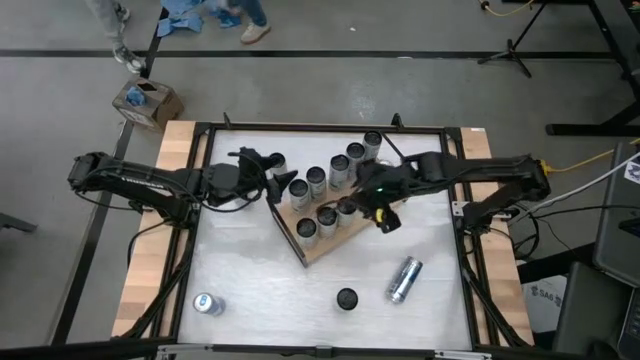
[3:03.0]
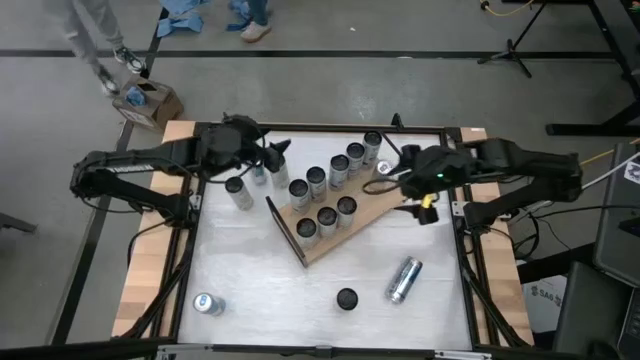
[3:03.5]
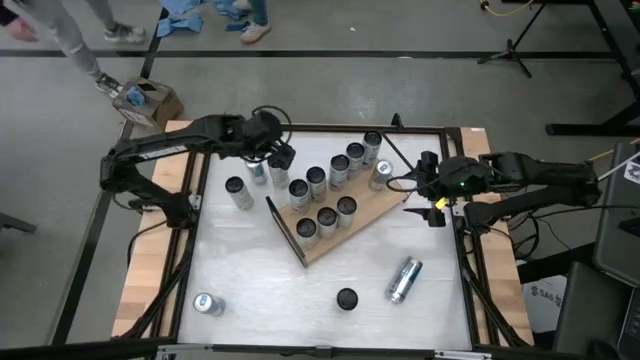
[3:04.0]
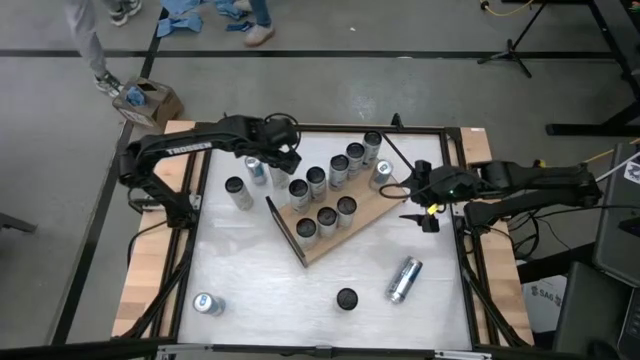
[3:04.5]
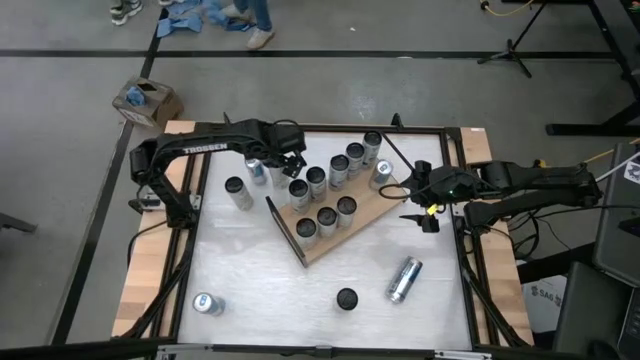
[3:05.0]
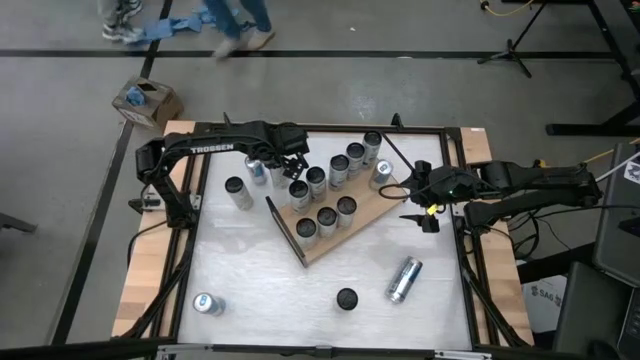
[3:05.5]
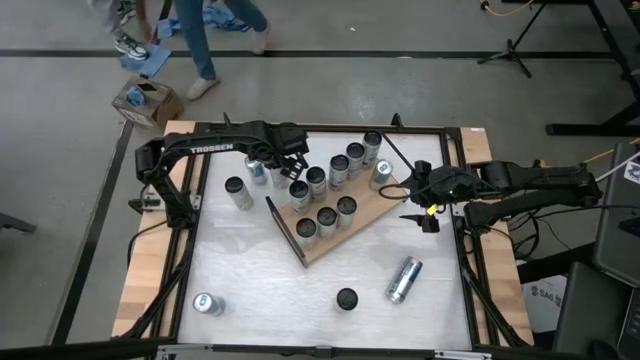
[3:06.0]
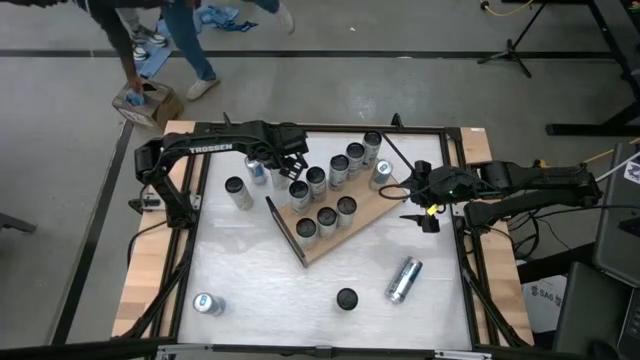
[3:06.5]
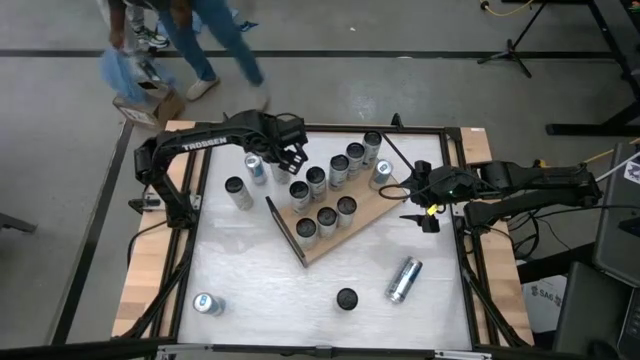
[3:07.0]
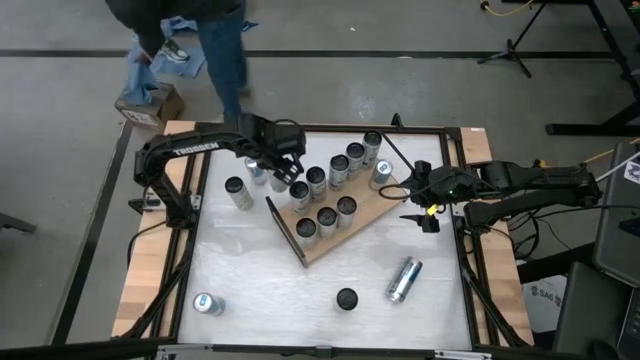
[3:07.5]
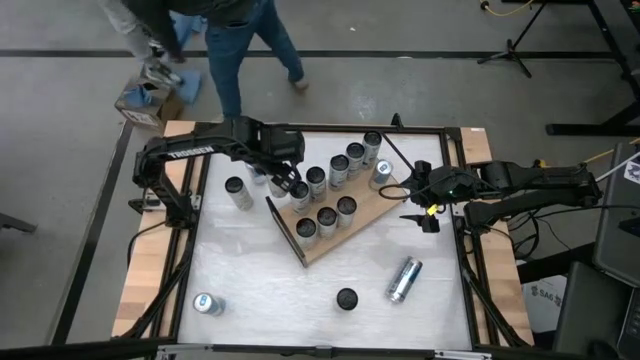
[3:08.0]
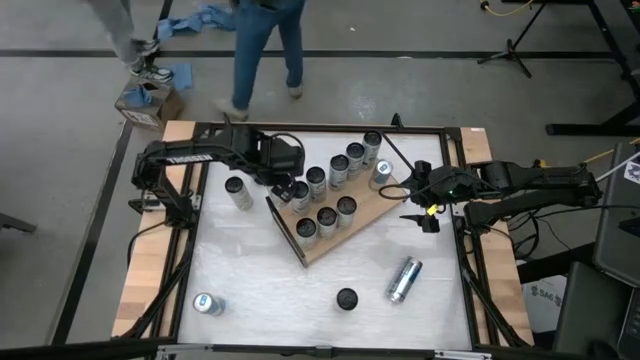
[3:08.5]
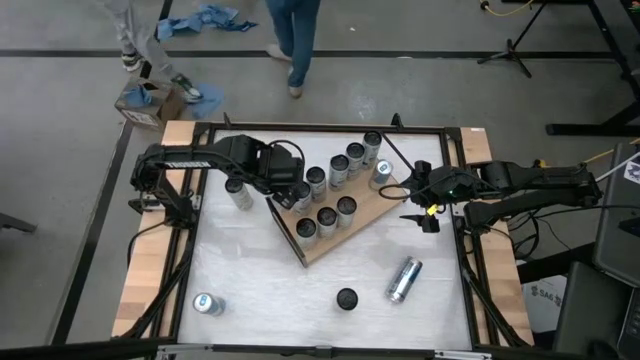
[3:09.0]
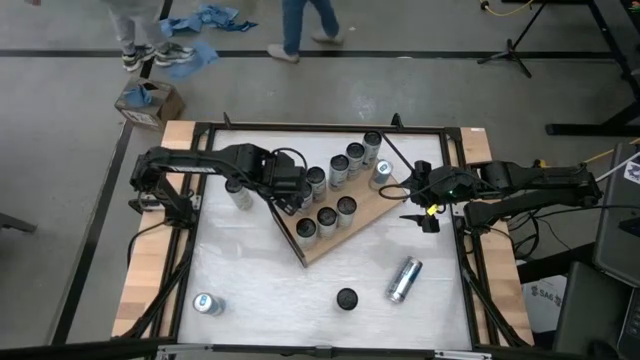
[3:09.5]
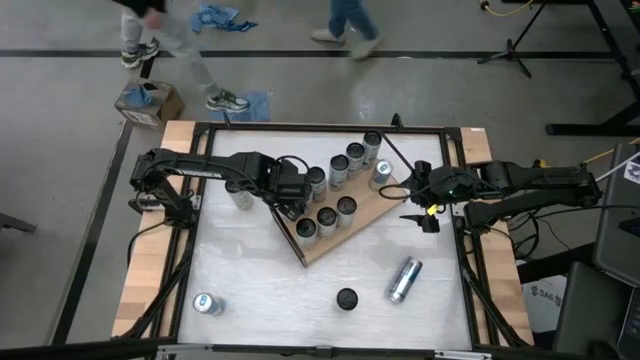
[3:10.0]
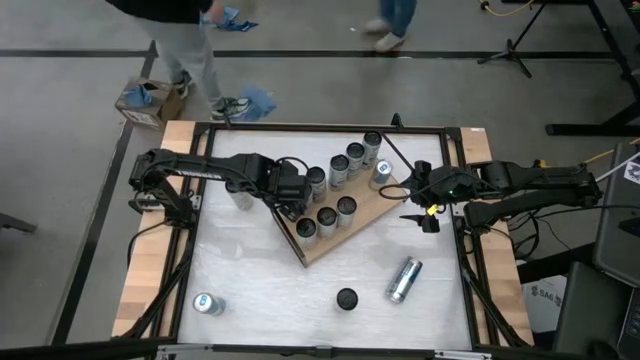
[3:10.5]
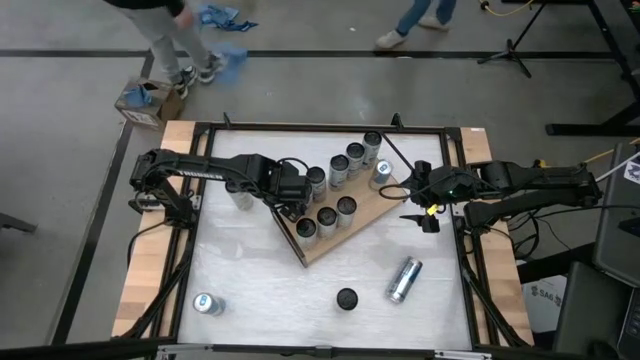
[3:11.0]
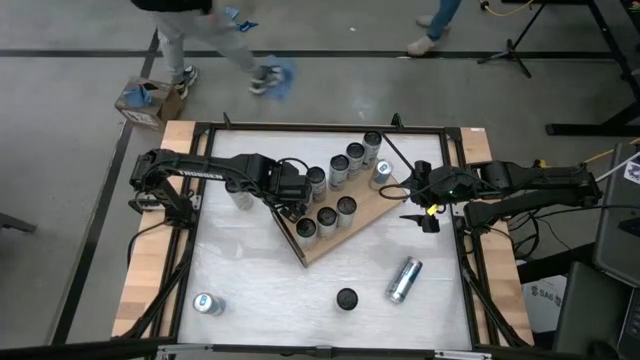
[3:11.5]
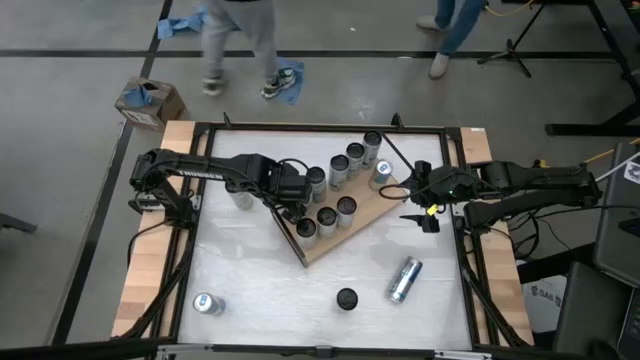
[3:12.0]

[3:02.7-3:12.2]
Task: Place canned beverage on shelf
Put the white yellow soda can on the shelf

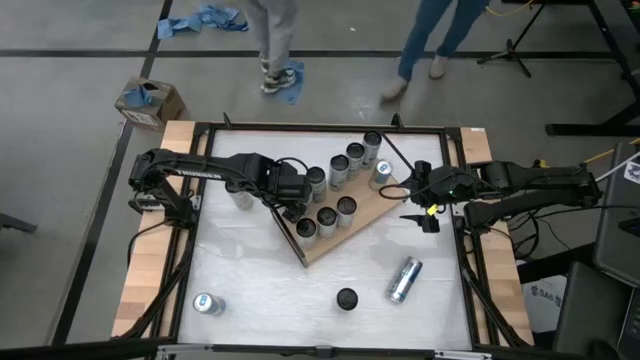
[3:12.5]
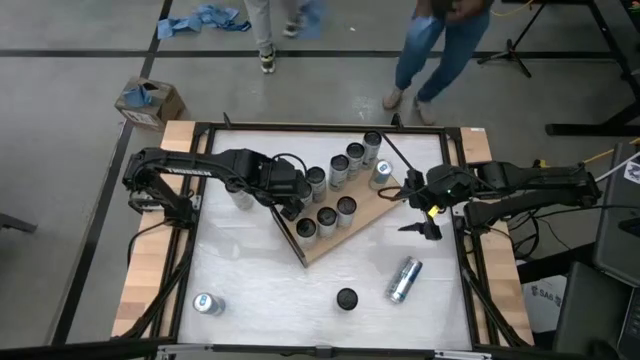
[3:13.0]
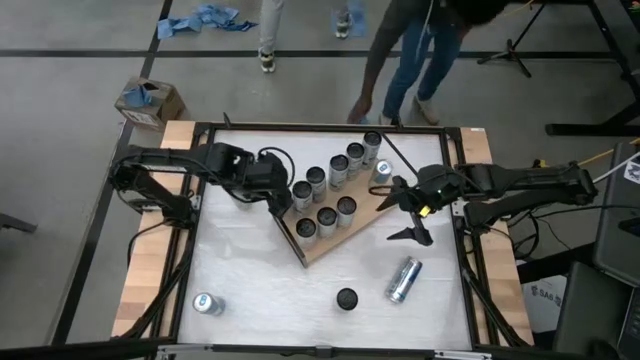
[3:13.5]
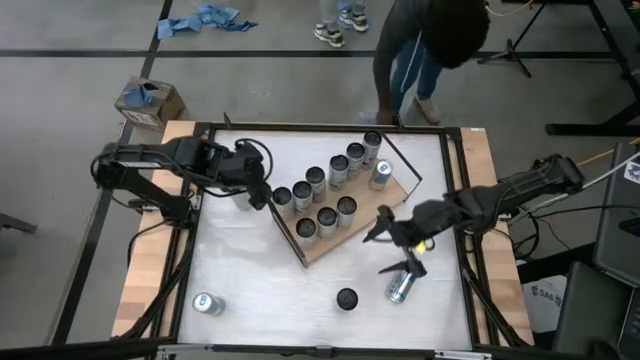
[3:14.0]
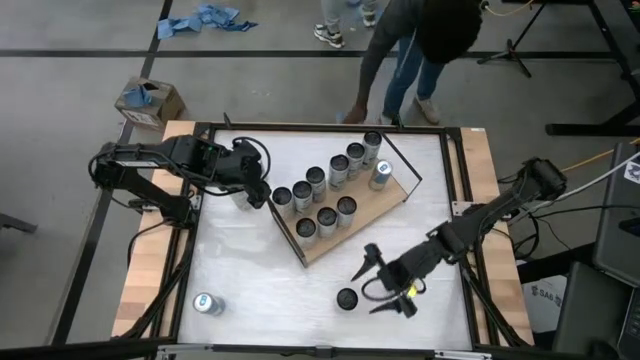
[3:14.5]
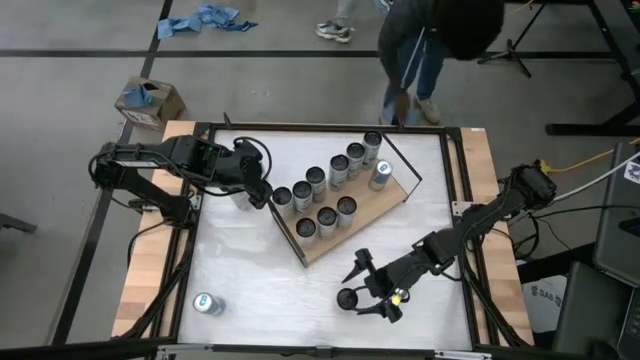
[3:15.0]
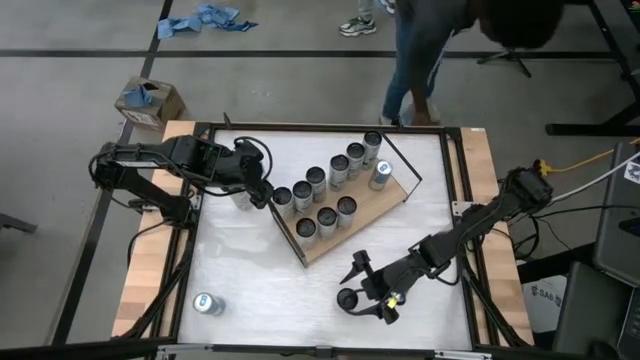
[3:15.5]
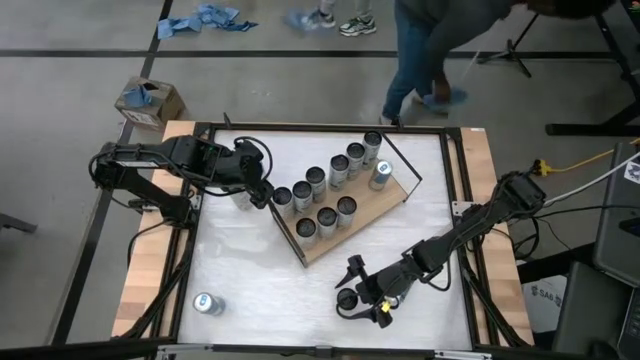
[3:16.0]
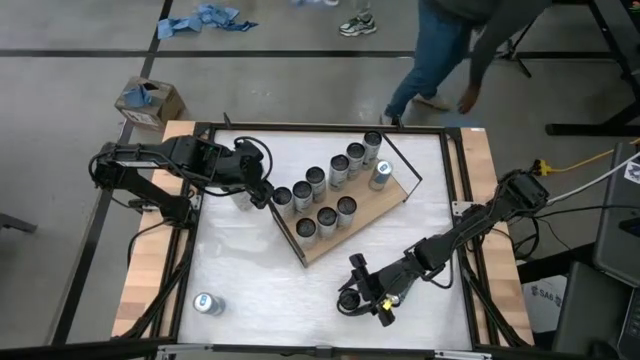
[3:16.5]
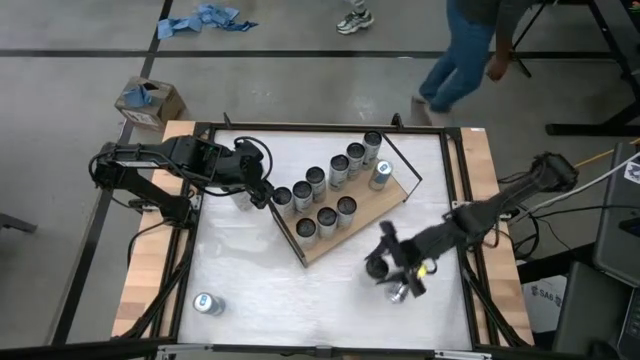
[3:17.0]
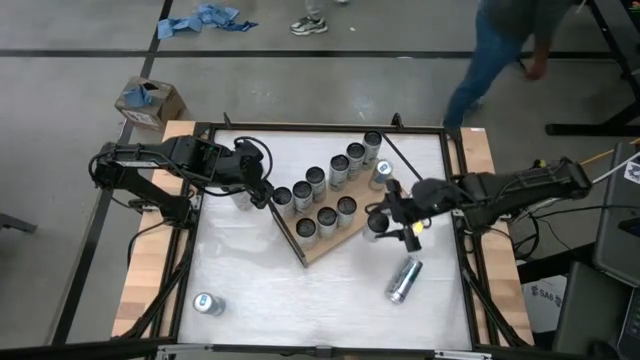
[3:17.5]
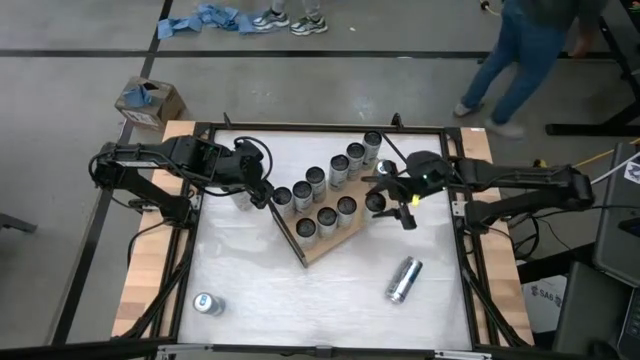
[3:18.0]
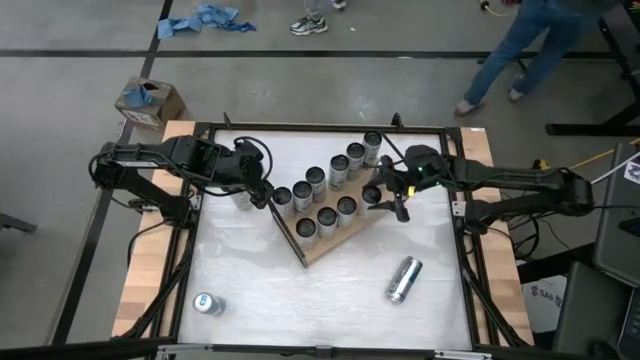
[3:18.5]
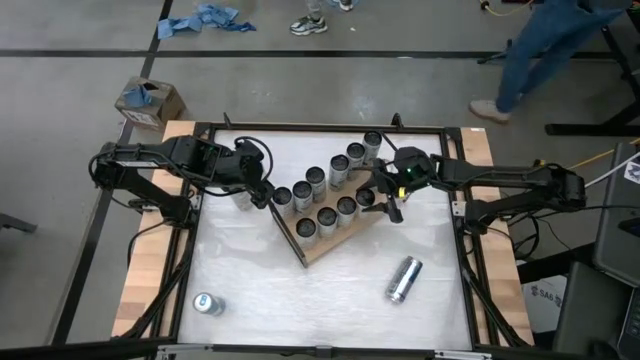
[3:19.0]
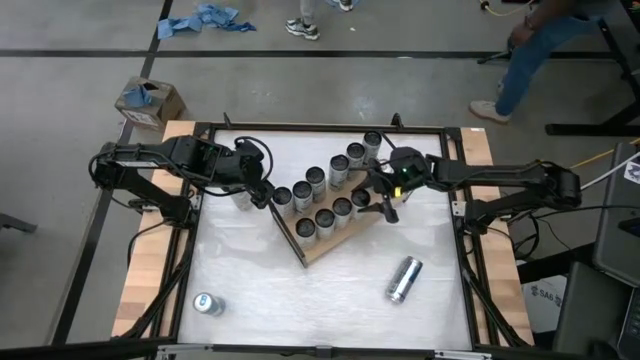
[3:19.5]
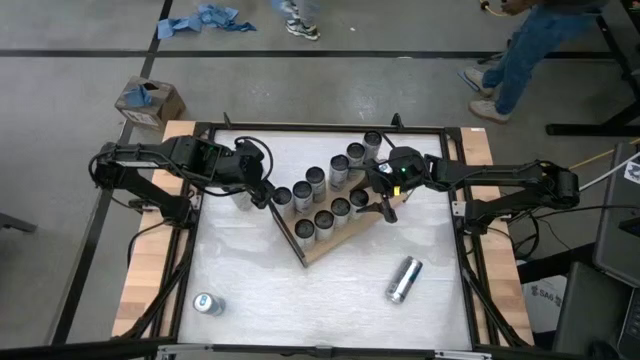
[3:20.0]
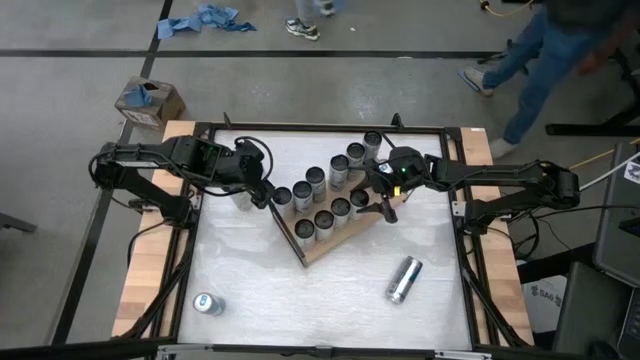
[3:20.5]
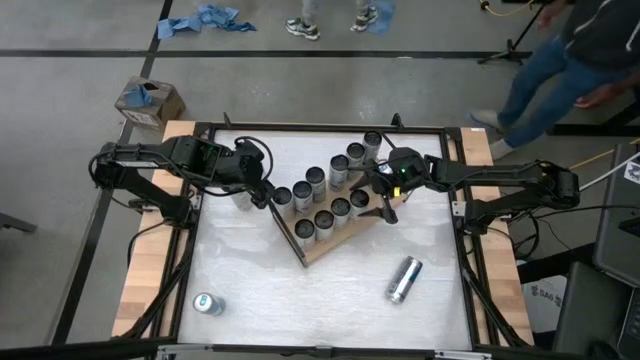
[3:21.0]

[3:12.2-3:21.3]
Put the white yellow soda can on the shelf

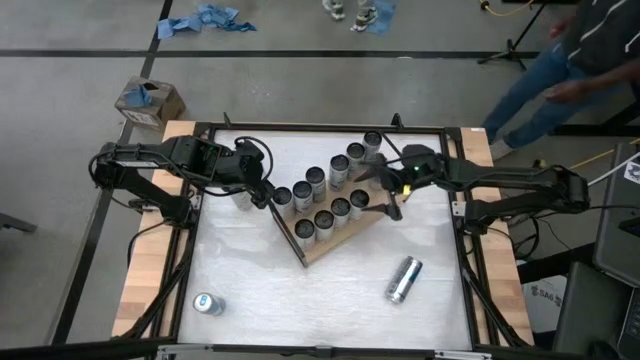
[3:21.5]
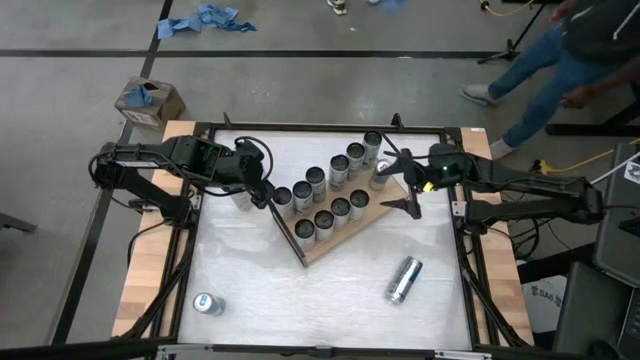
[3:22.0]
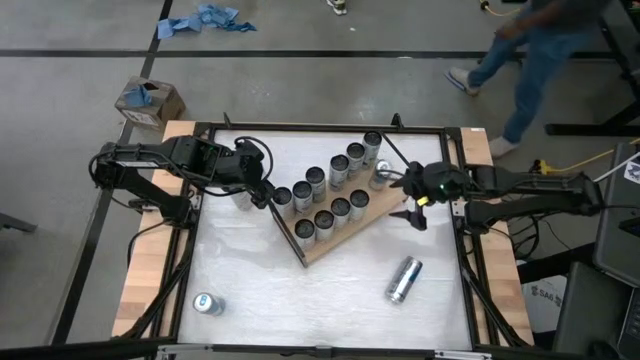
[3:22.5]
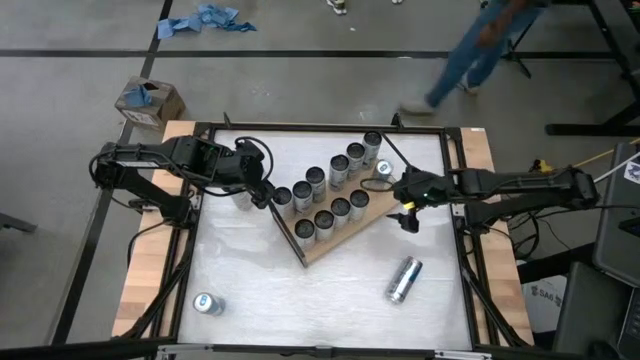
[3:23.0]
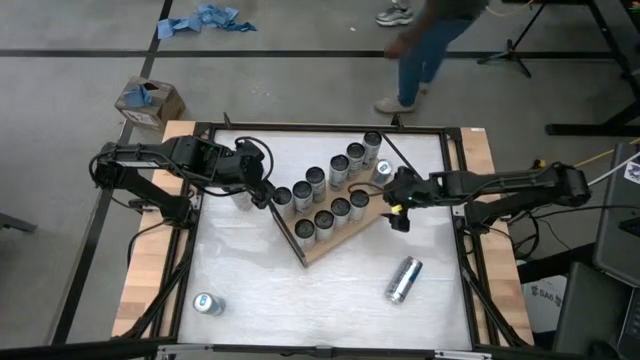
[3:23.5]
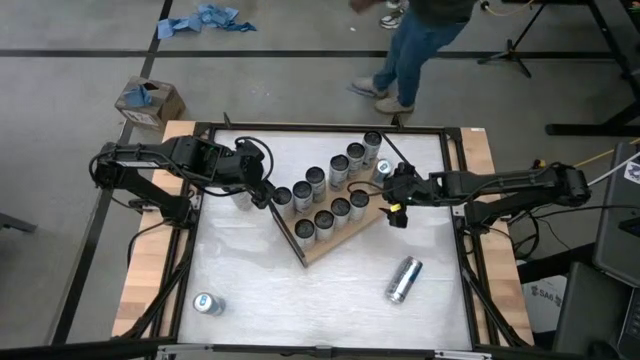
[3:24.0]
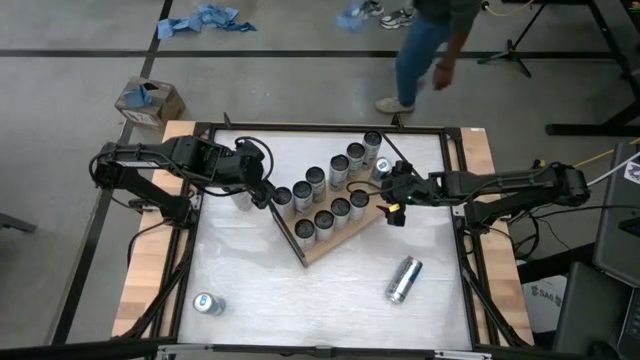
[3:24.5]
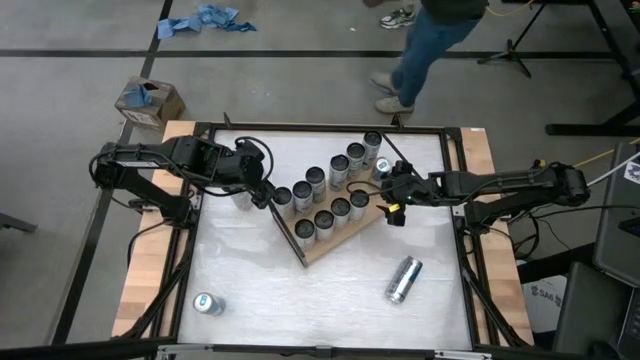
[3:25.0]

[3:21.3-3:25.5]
Adjust the blue soda can on the shelf
